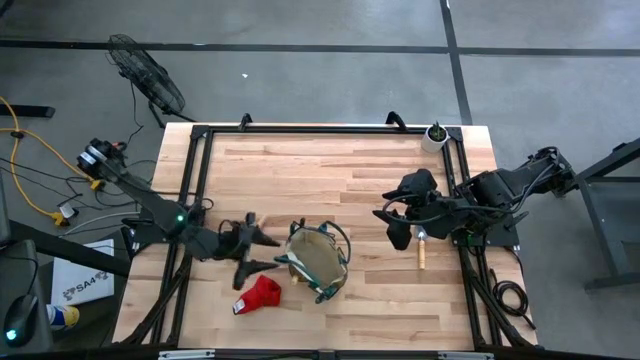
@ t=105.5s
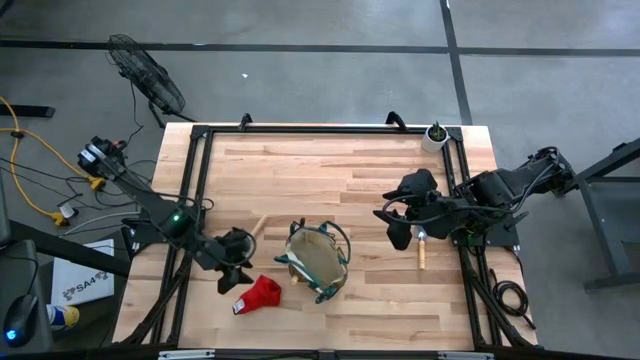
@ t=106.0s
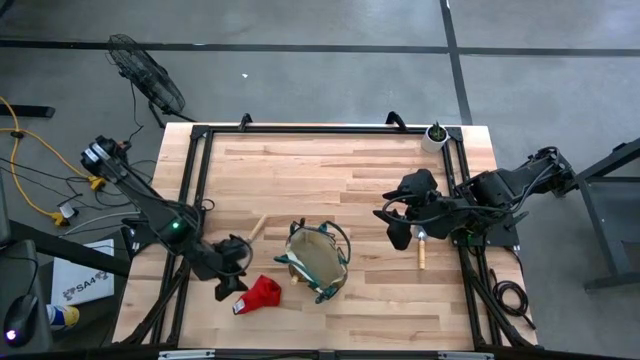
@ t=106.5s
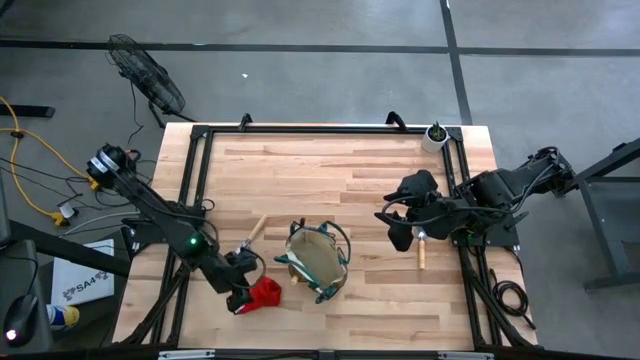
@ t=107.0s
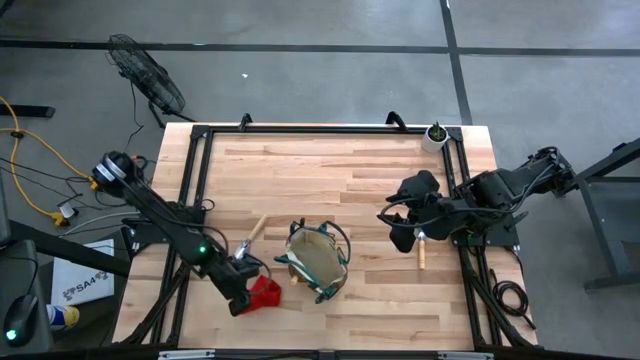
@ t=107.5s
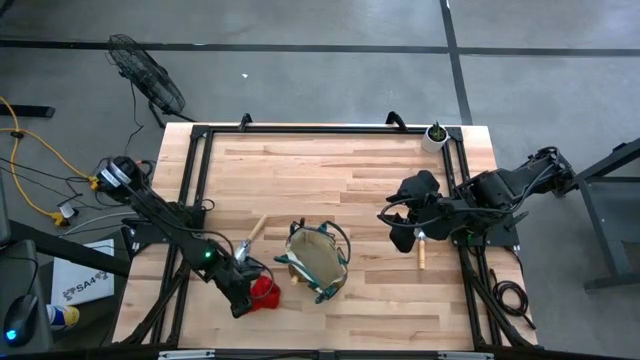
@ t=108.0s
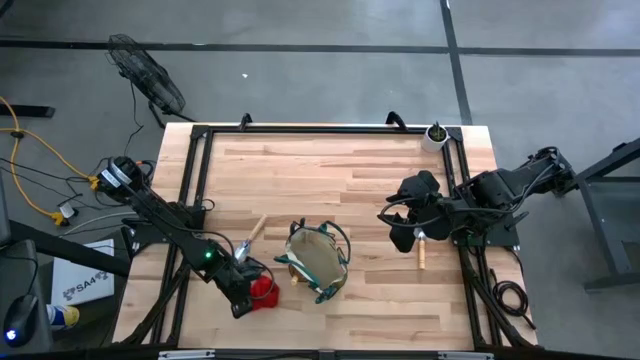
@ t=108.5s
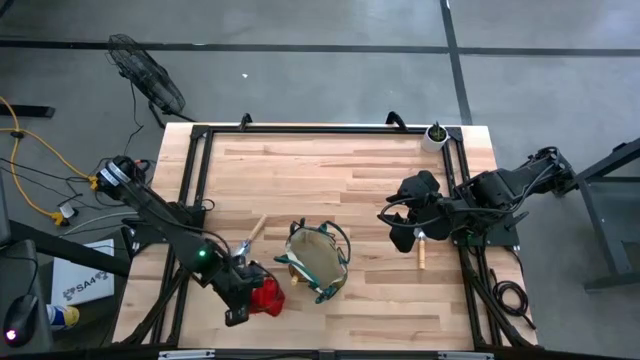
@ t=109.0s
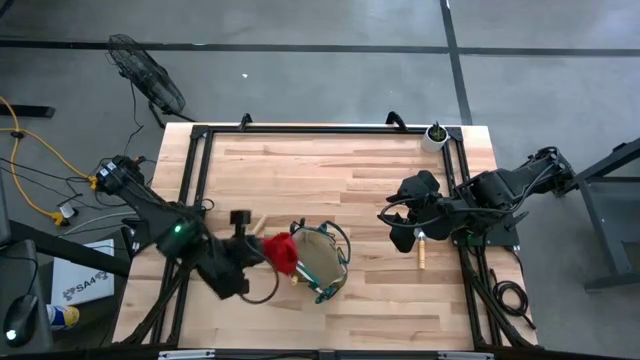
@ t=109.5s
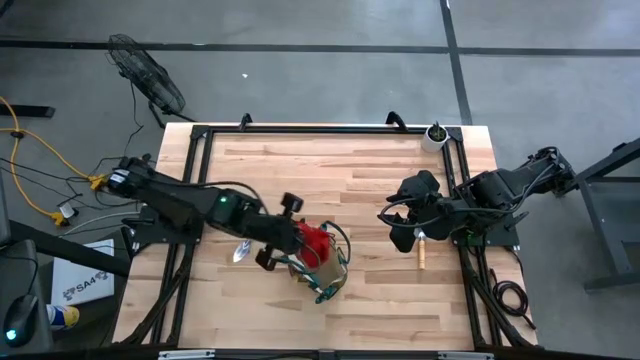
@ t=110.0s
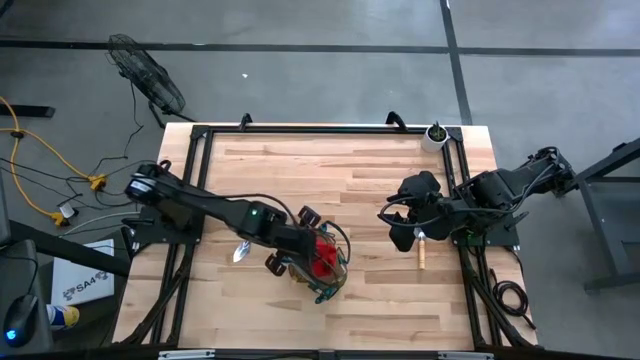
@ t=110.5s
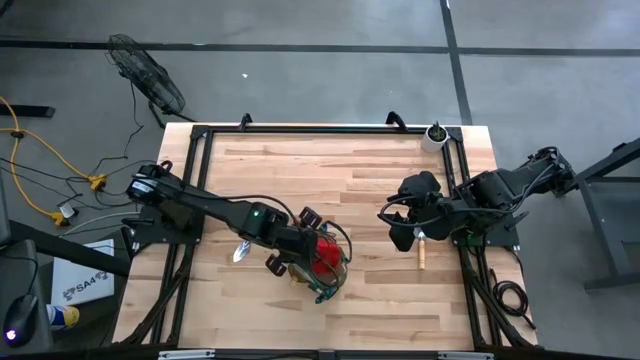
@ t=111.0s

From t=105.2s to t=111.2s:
Task: Pick & Place Garden tools in Gardening bag
Put the red gloves into the light brown gardening bag

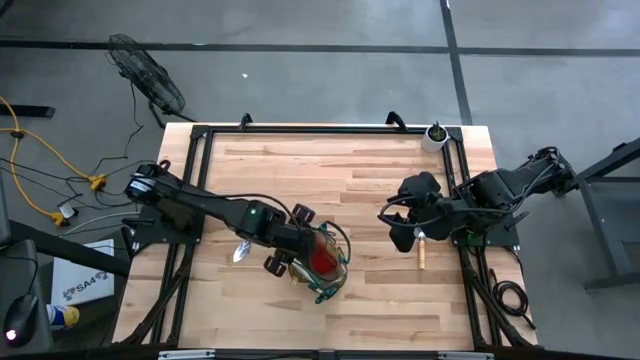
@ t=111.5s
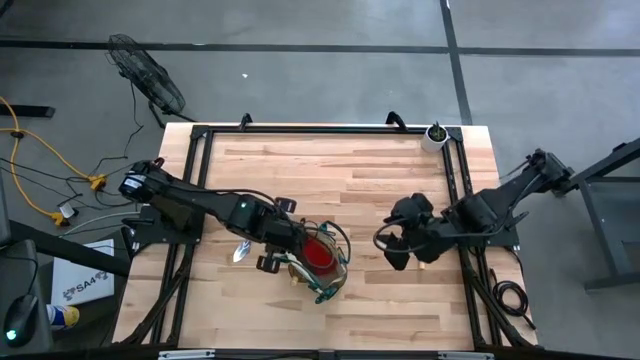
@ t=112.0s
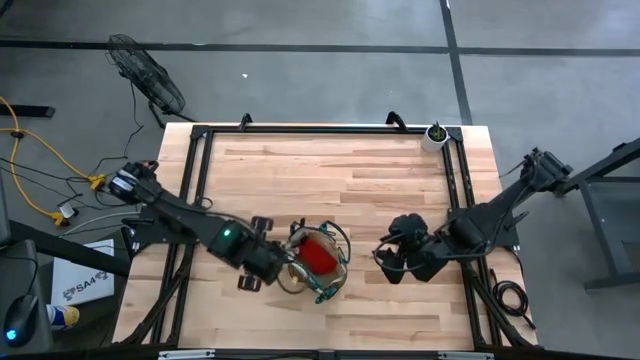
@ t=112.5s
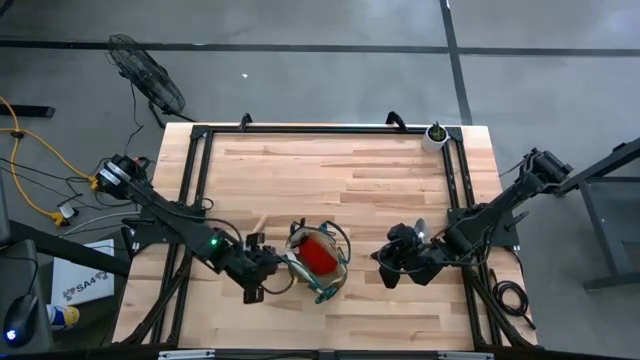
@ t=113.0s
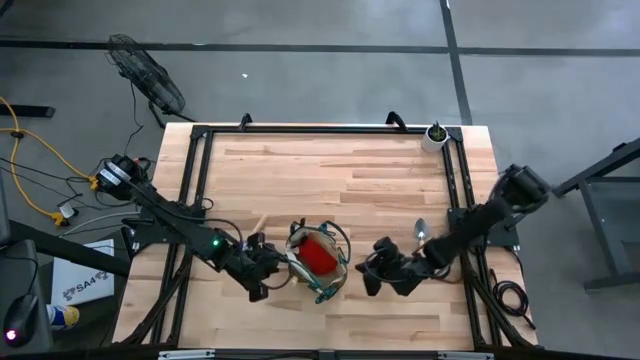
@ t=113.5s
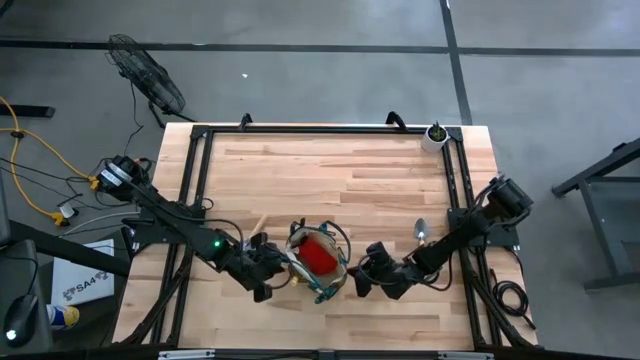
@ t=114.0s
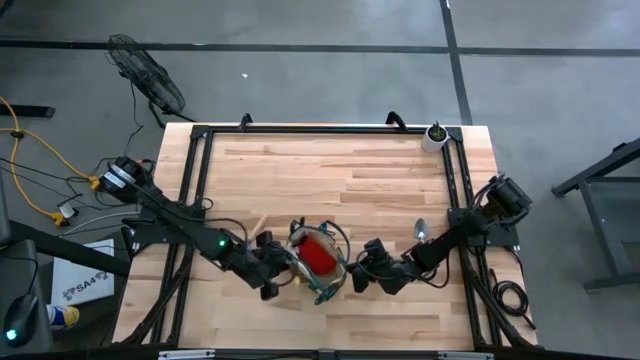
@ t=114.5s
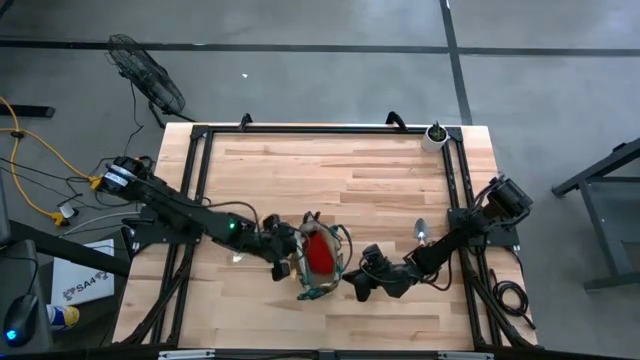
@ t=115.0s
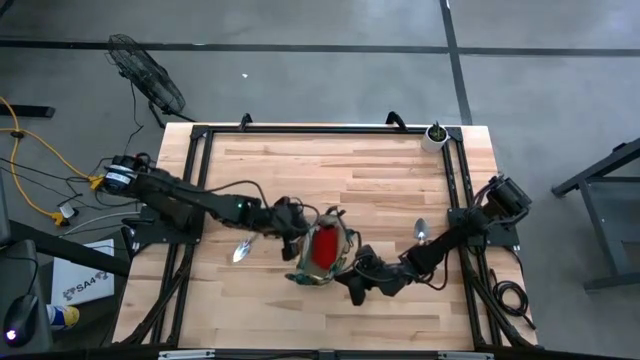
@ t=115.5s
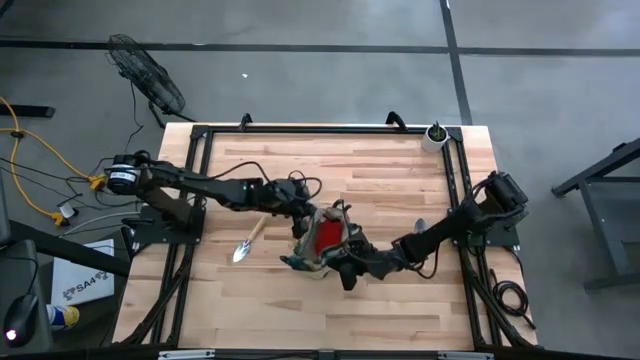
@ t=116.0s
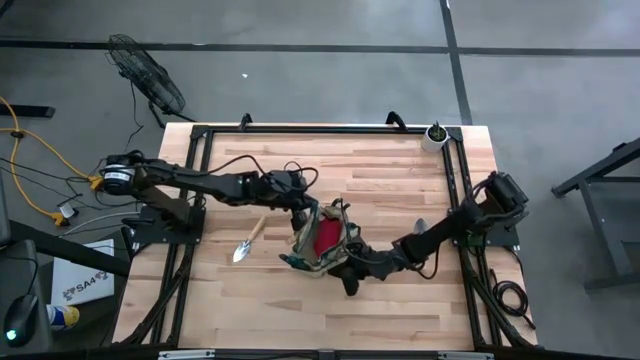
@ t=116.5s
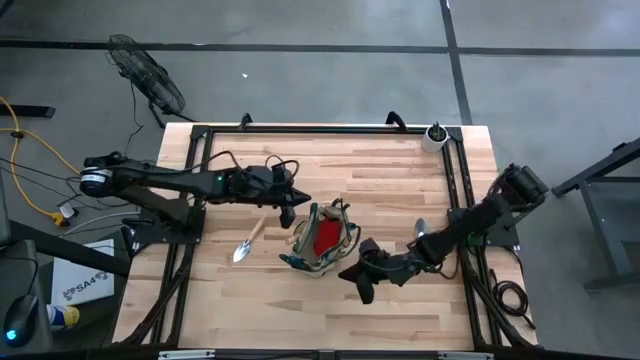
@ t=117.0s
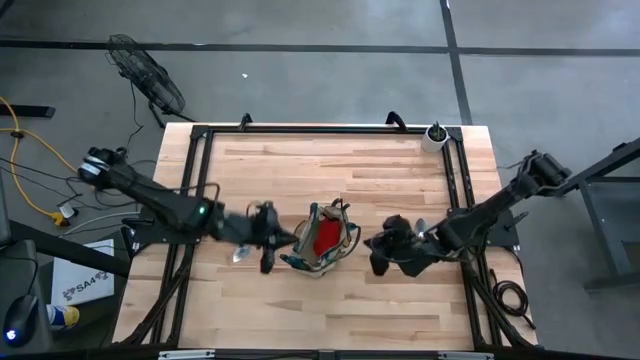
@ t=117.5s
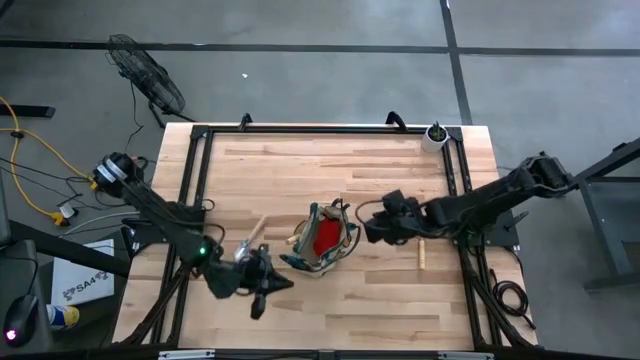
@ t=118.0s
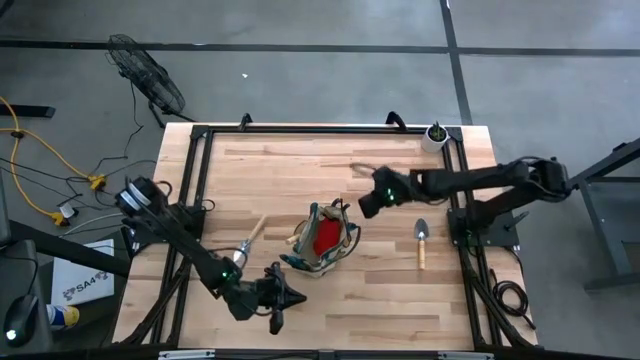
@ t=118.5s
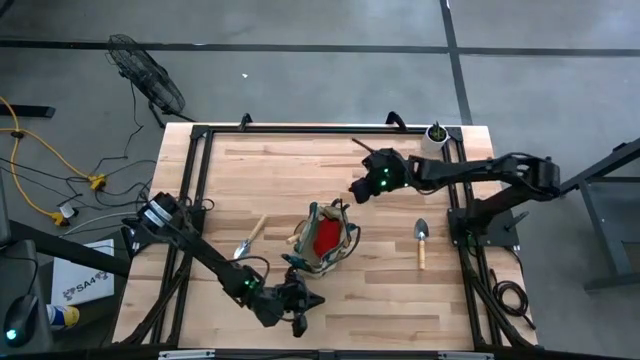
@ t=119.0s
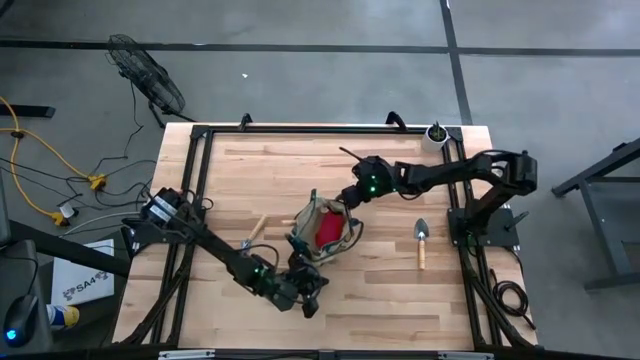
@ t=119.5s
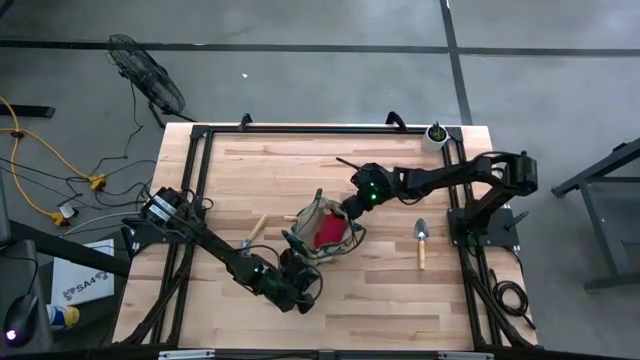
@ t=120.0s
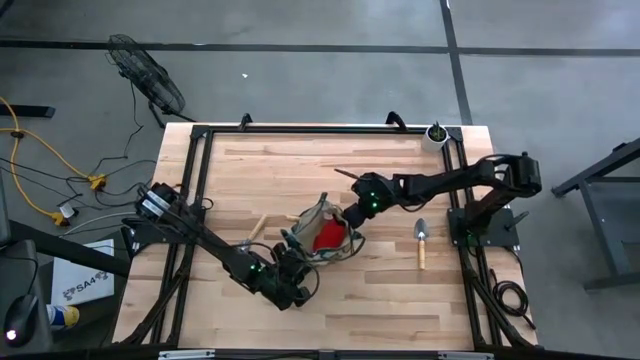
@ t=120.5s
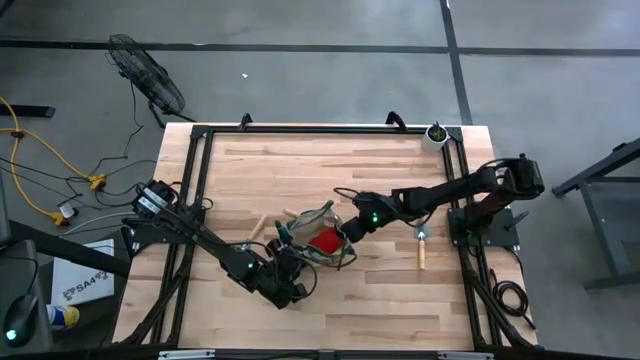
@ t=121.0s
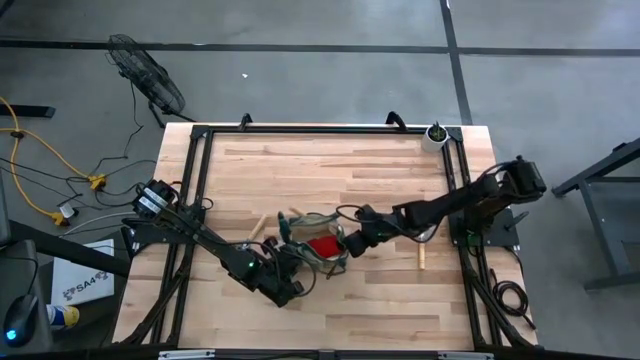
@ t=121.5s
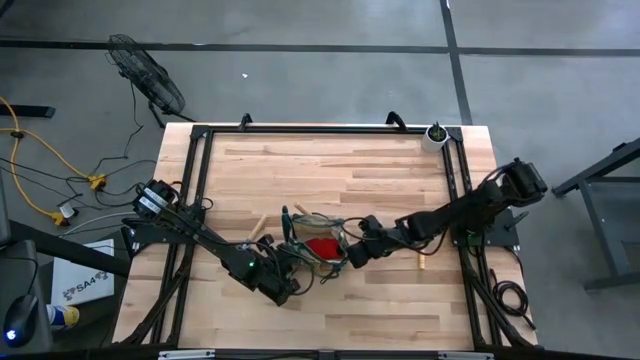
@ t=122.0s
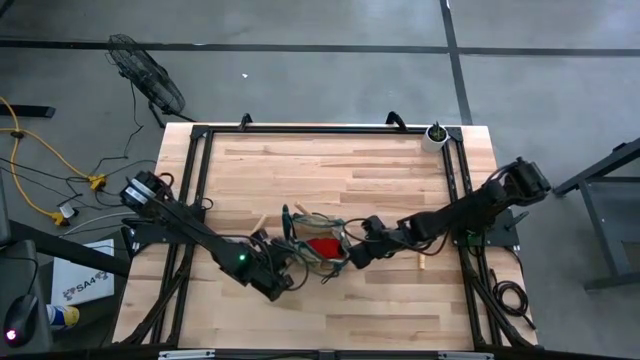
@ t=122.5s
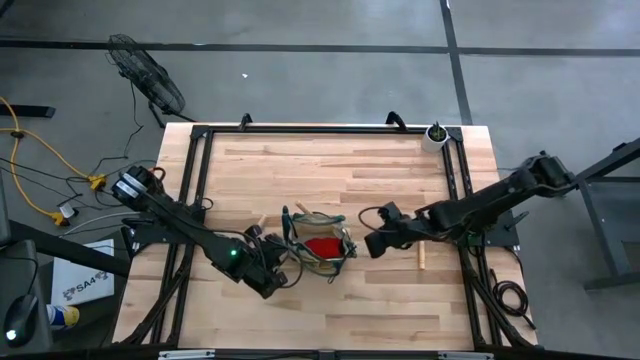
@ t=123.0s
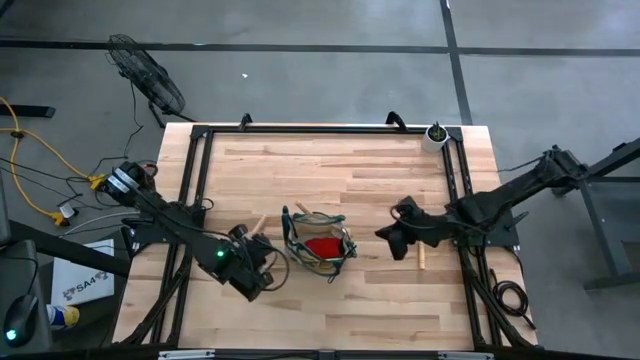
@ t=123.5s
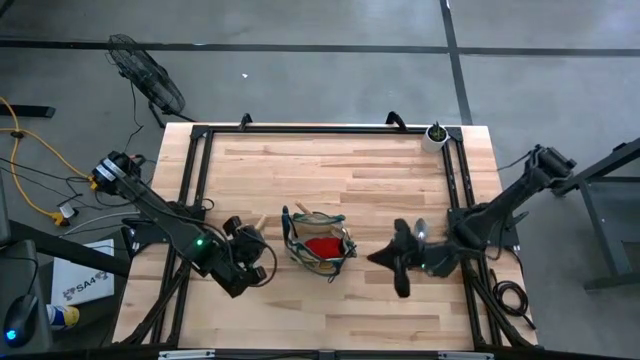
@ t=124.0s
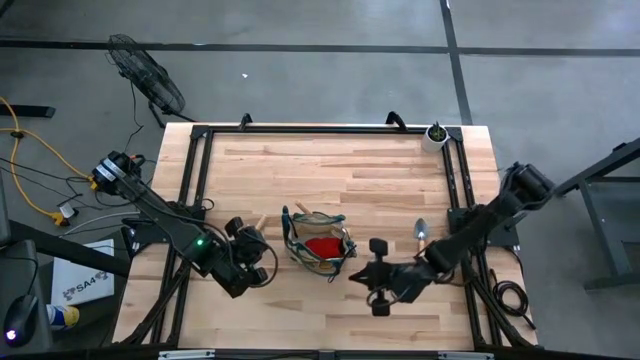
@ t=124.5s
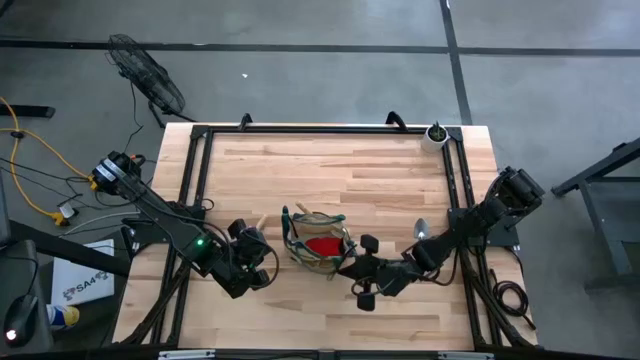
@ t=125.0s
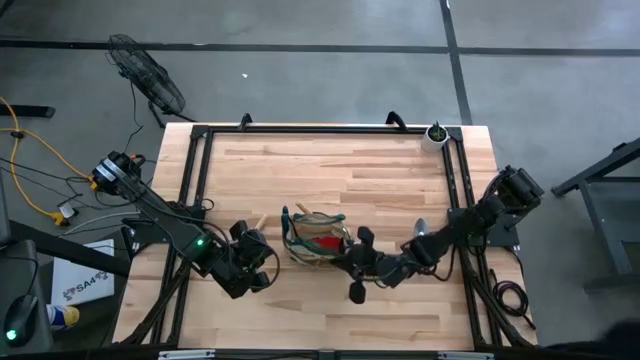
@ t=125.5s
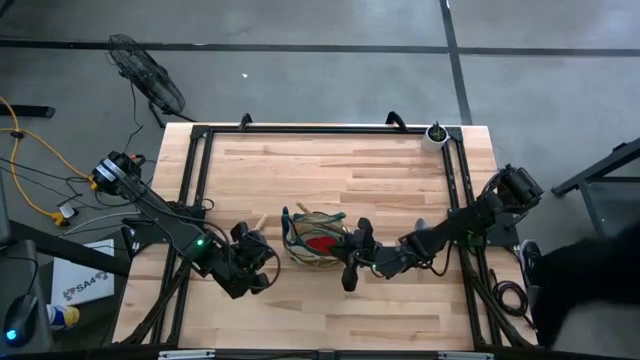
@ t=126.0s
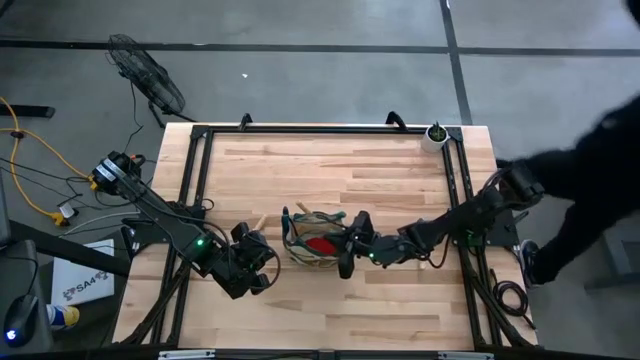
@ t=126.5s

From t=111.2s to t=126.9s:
Adjust the light brown gardening bag
